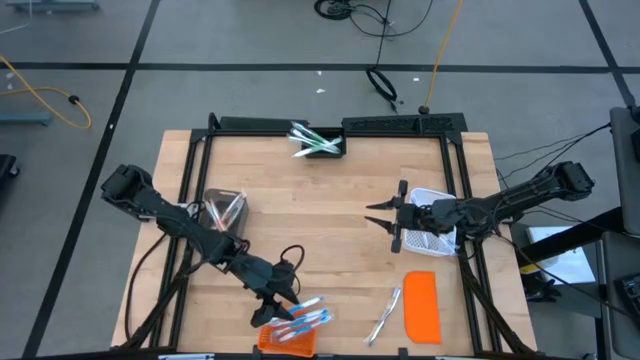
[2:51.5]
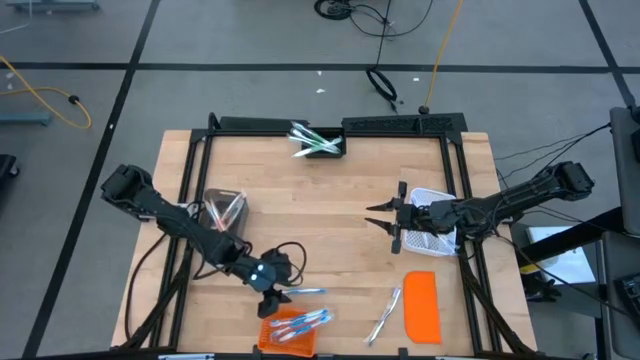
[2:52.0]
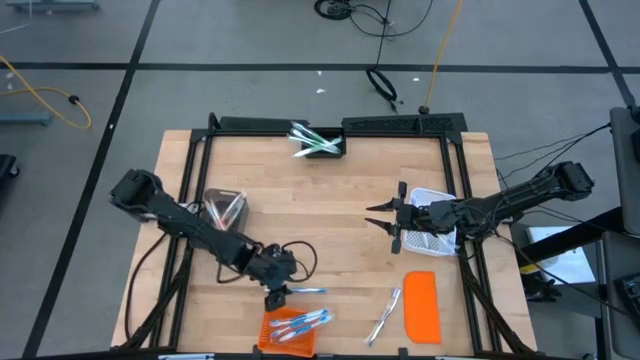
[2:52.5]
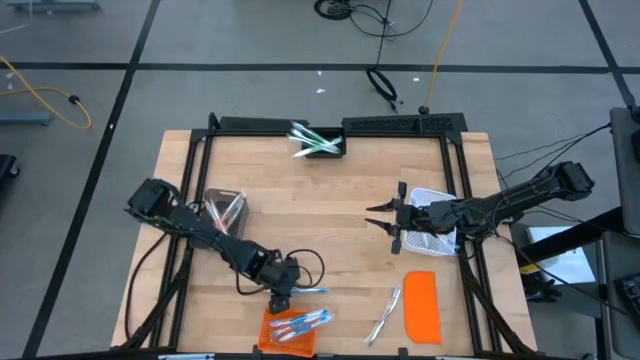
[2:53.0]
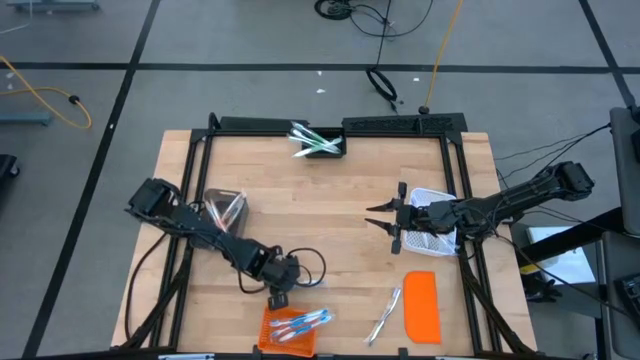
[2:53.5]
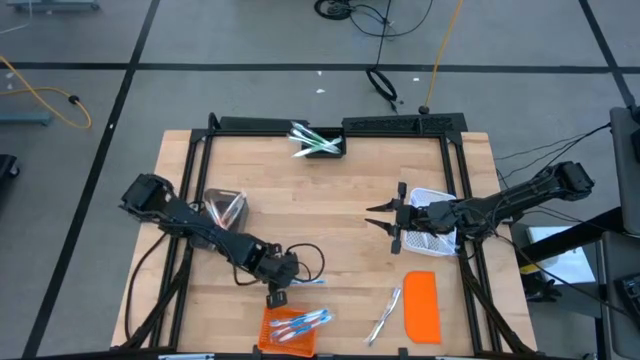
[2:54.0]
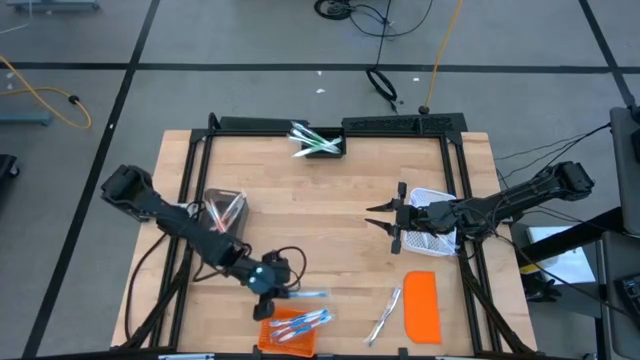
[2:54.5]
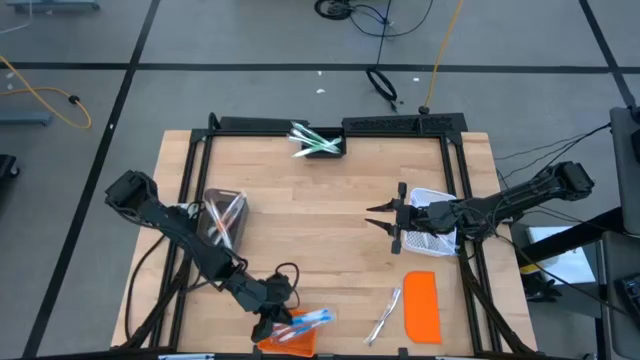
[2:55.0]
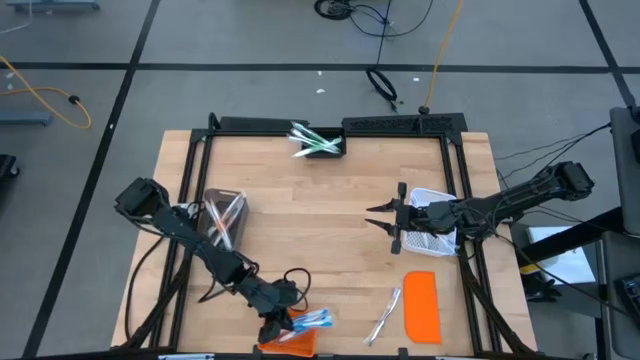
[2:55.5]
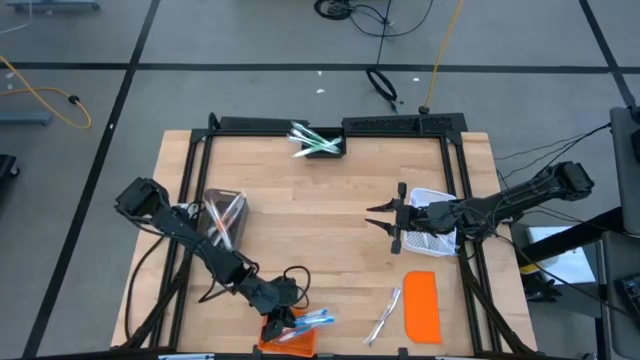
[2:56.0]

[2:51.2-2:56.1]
Task: Pick & Place Toothbrushes
Put the blue toothbrush into the orange bin

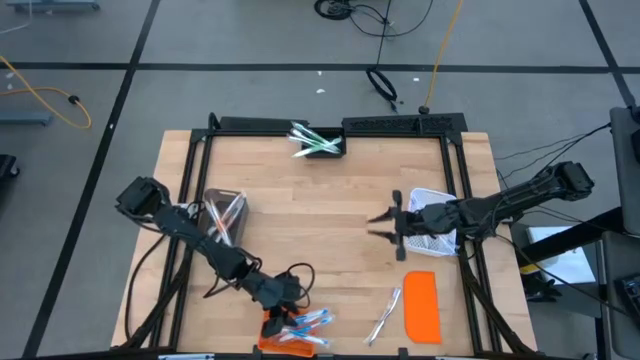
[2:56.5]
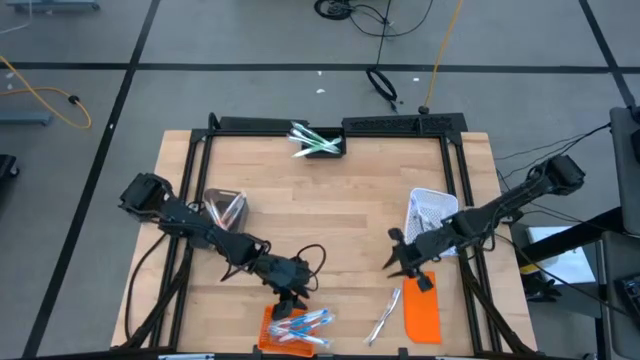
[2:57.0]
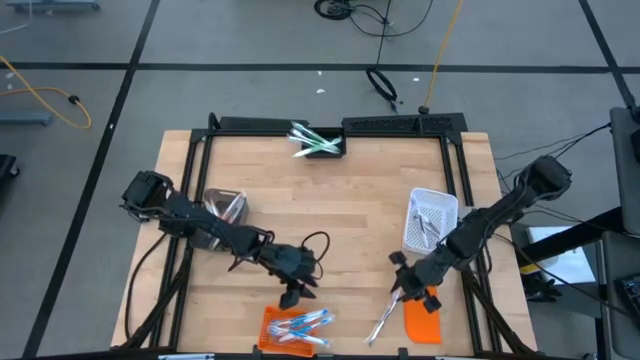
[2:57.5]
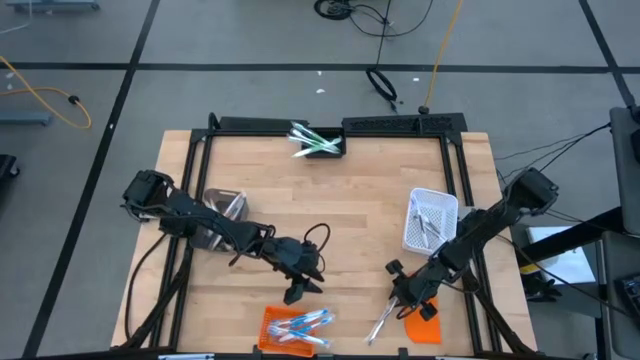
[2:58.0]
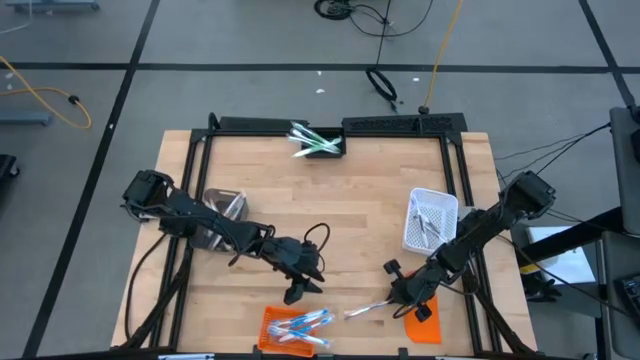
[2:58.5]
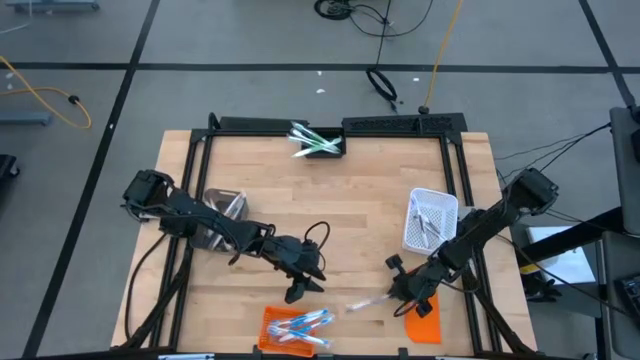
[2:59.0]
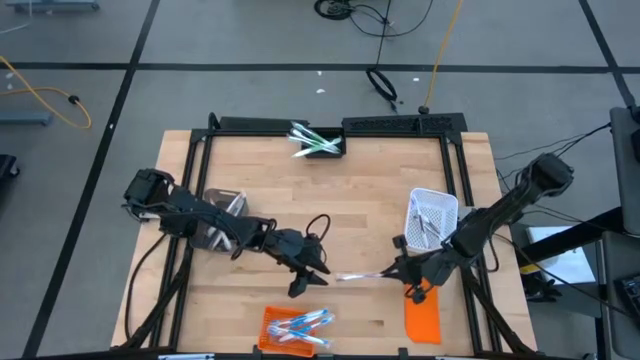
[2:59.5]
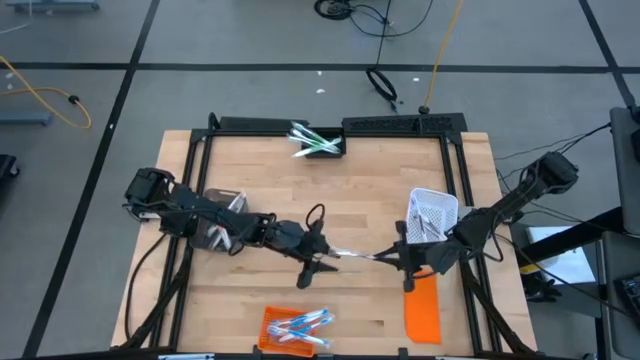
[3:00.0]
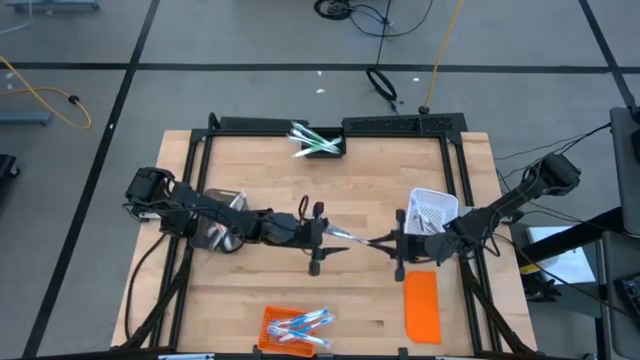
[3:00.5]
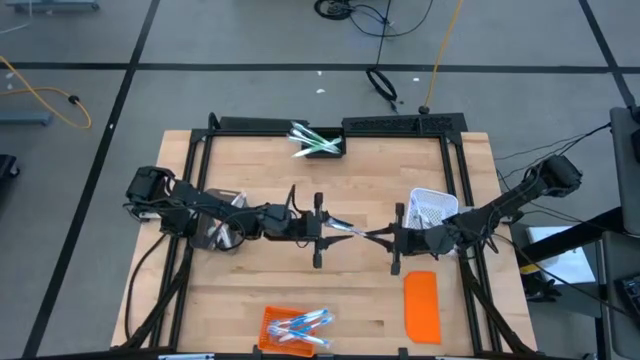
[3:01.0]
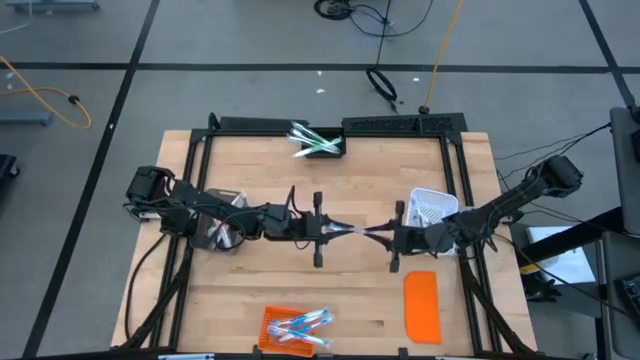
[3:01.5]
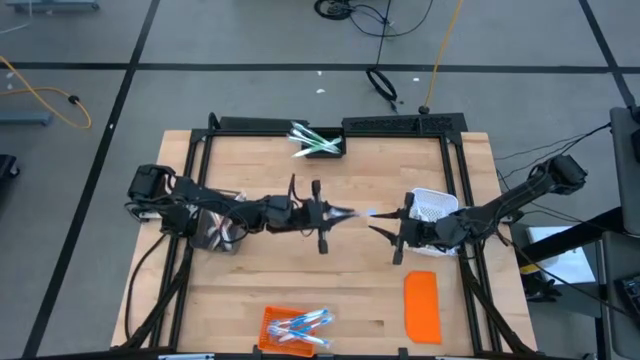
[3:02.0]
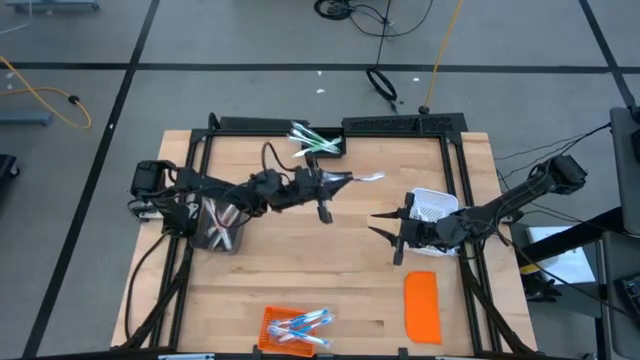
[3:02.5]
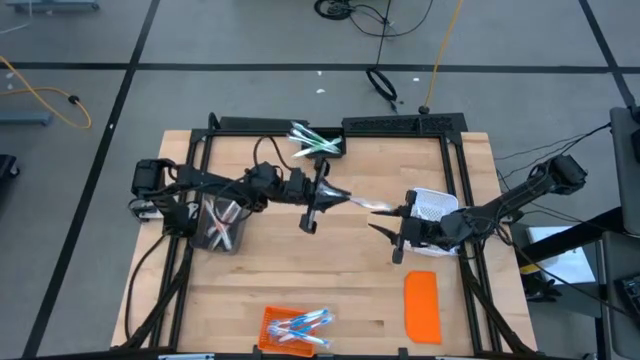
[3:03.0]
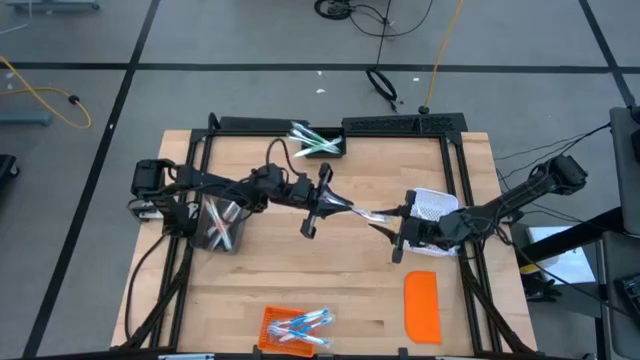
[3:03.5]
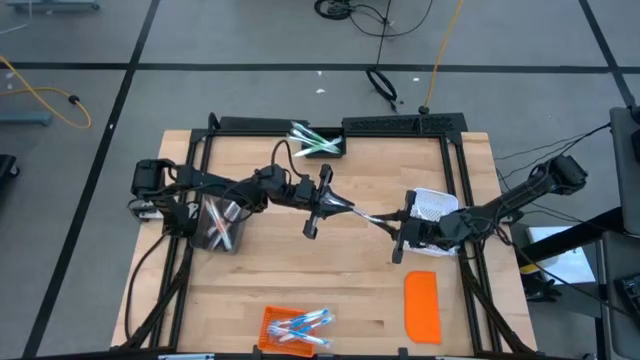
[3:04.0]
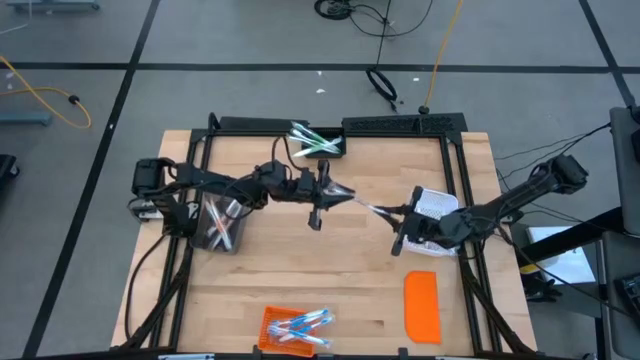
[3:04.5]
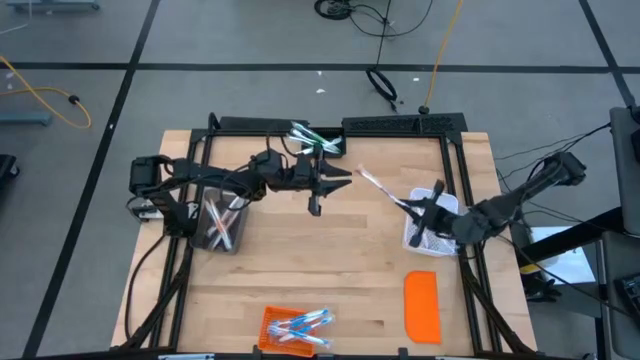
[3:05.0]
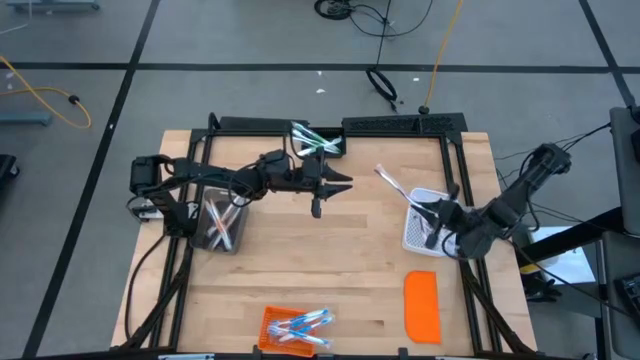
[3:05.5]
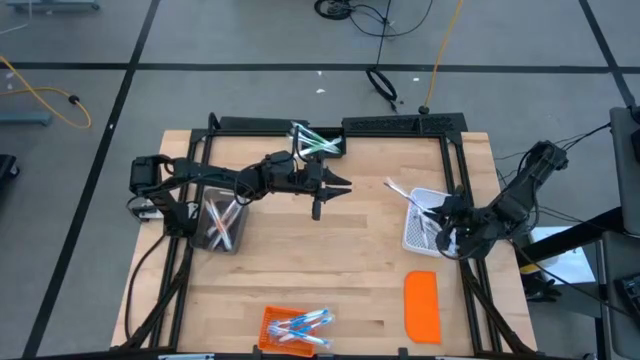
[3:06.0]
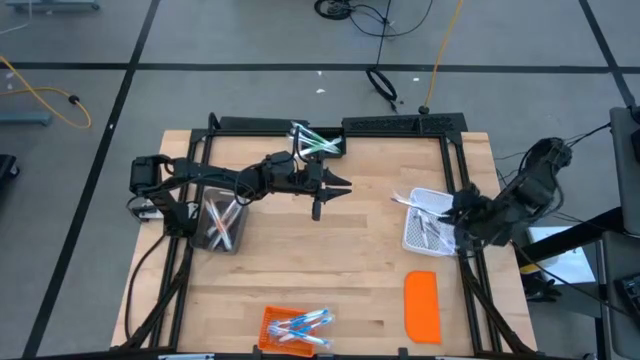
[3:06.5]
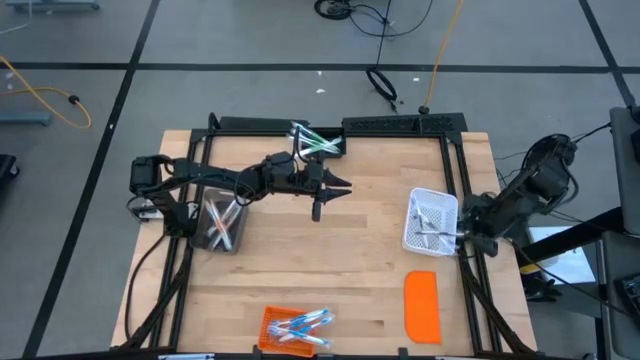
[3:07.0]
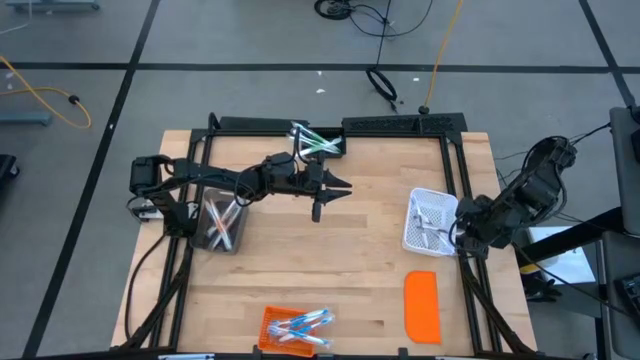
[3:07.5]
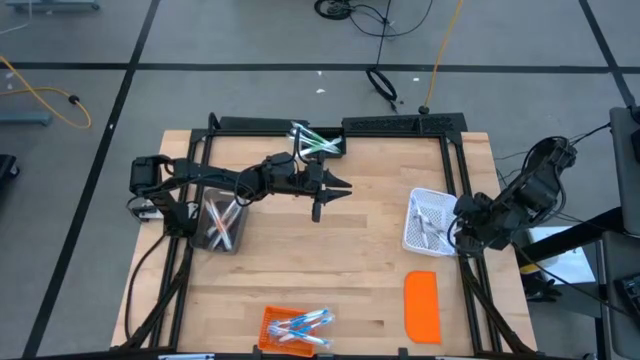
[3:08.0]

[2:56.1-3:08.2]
Put the purple toothbrush into the white bin

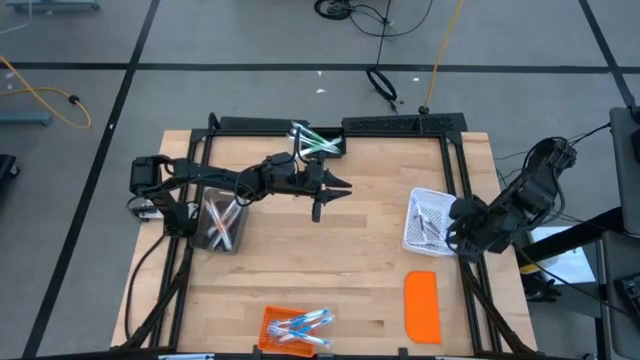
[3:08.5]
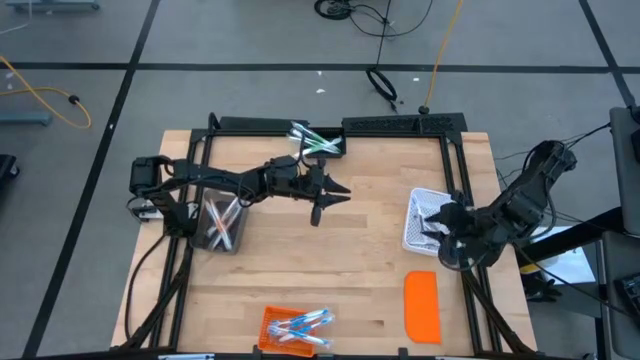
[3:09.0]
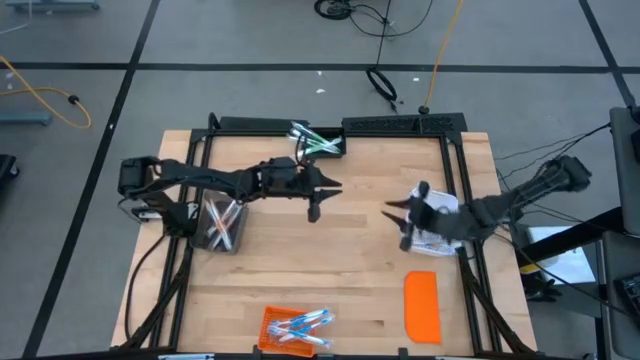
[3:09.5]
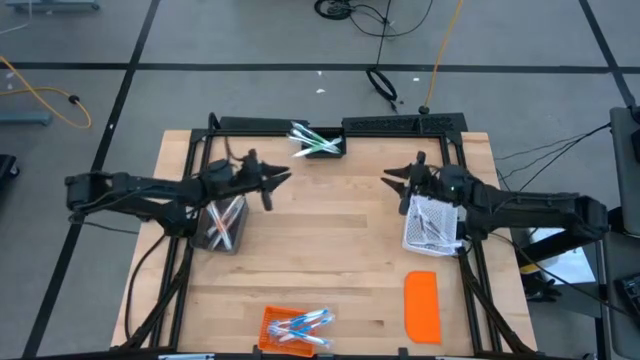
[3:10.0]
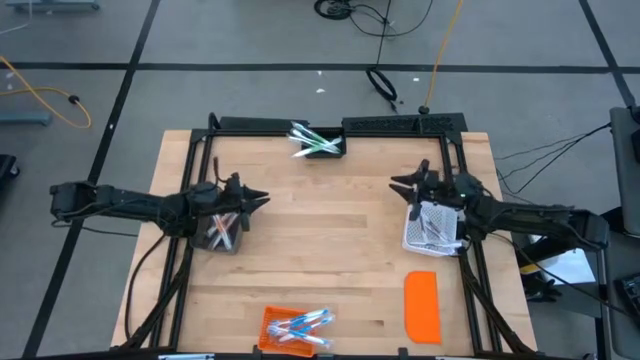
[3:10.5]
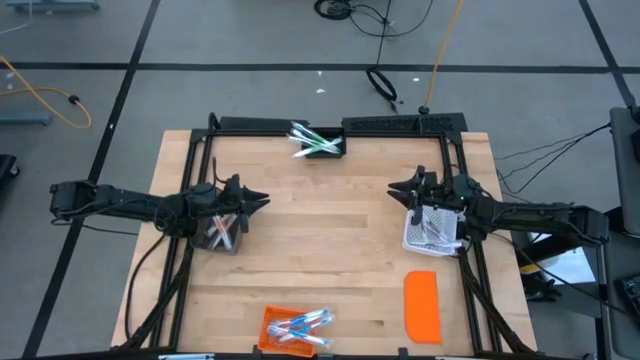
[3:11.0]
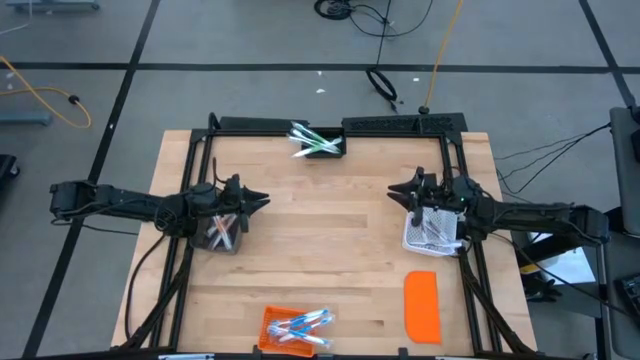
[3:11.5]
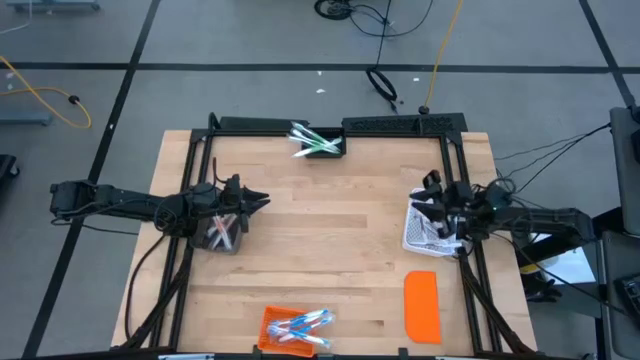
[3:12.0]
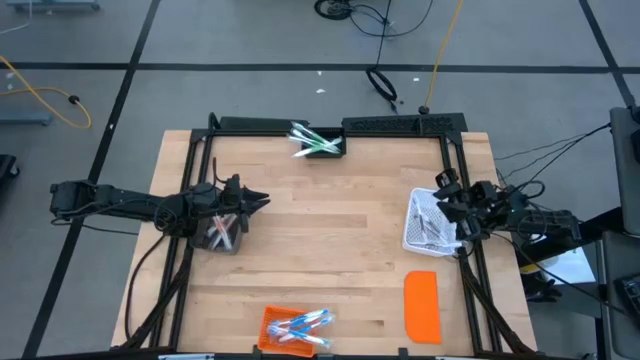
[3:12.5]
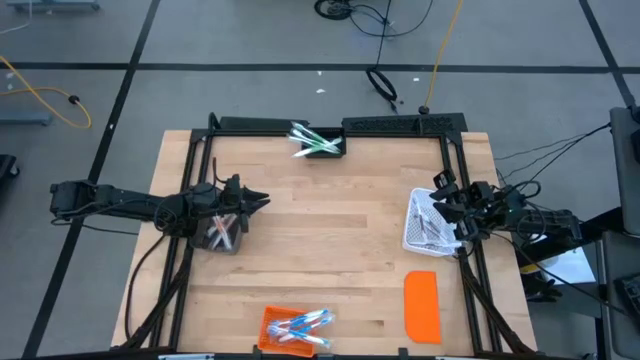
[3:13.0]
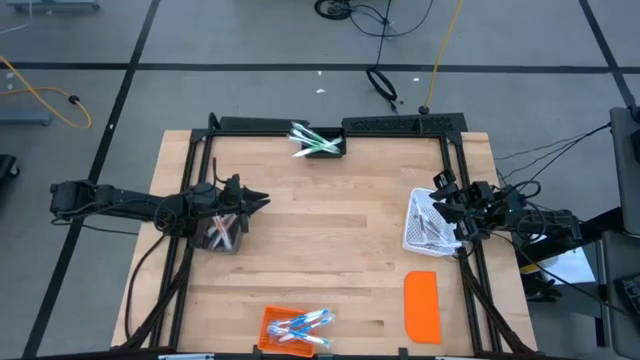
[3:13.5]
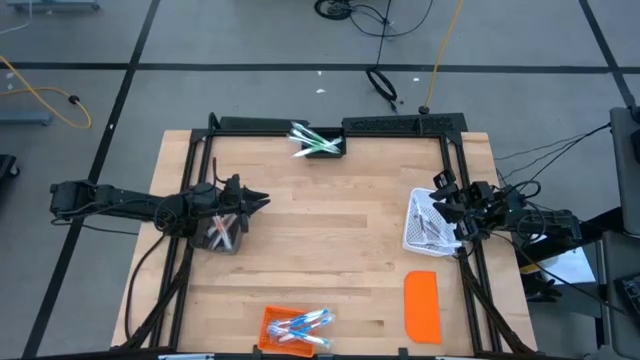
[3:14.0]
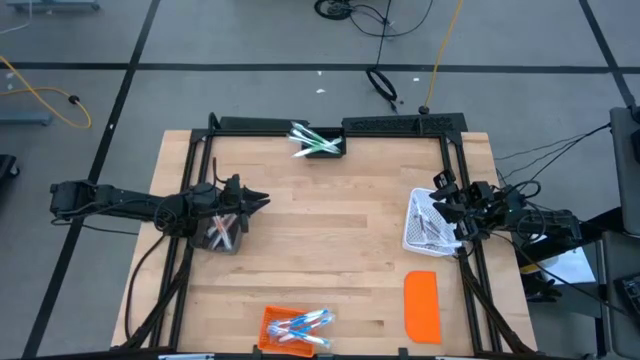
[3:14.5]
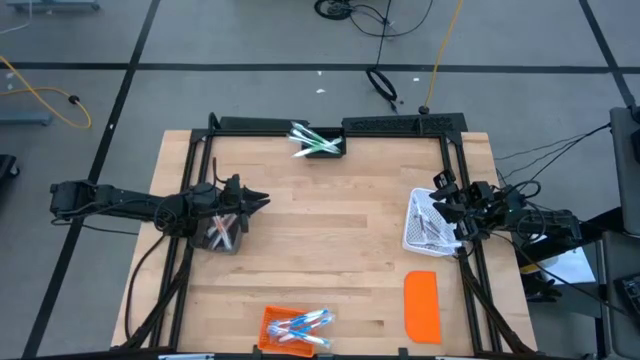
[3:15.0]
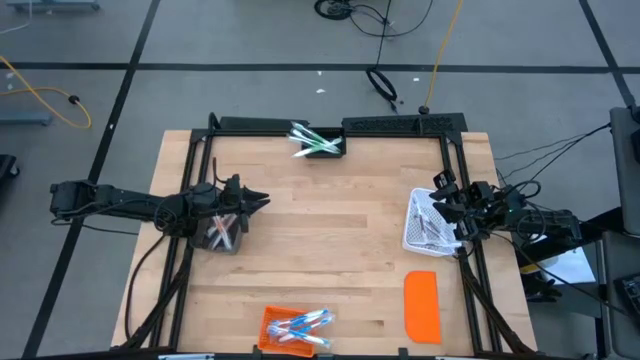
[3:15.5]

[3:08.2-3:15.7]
Return to Home Position
